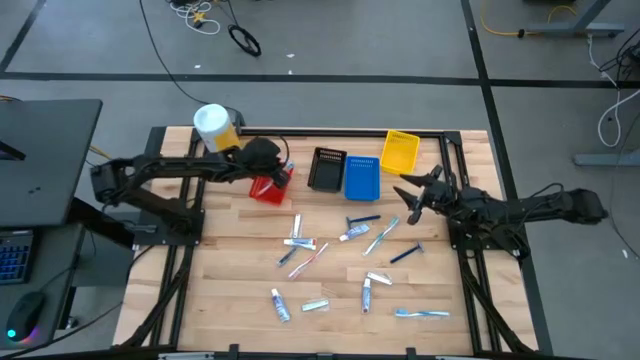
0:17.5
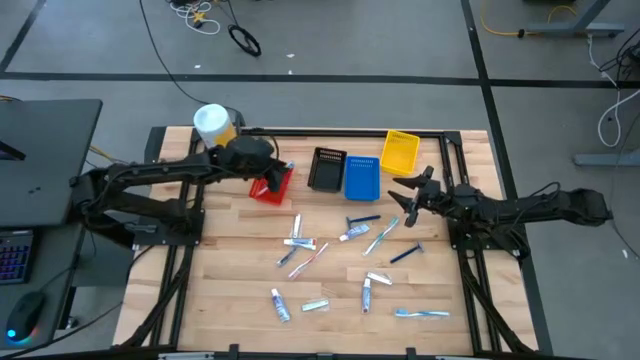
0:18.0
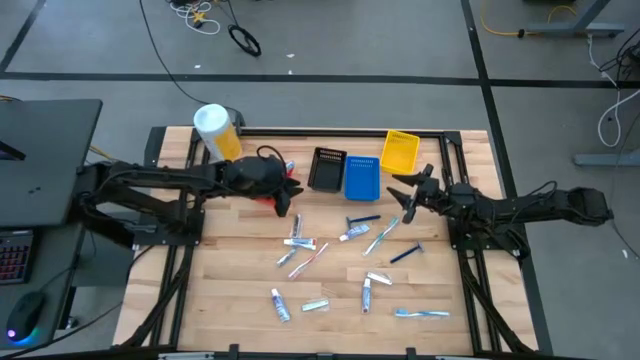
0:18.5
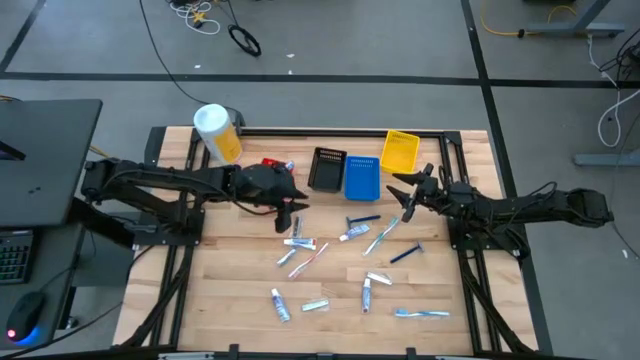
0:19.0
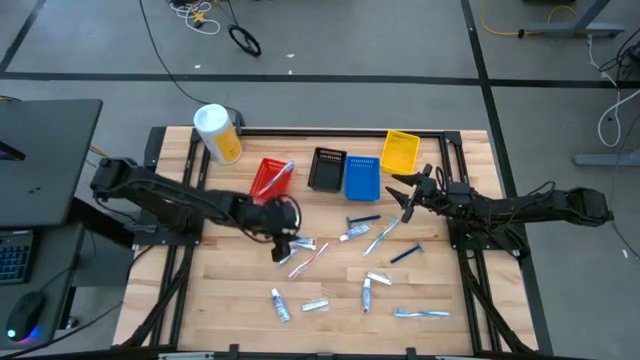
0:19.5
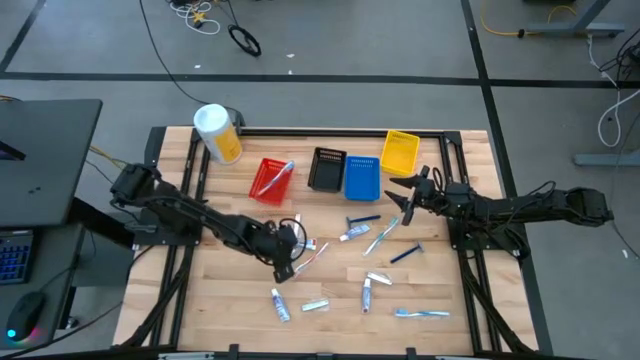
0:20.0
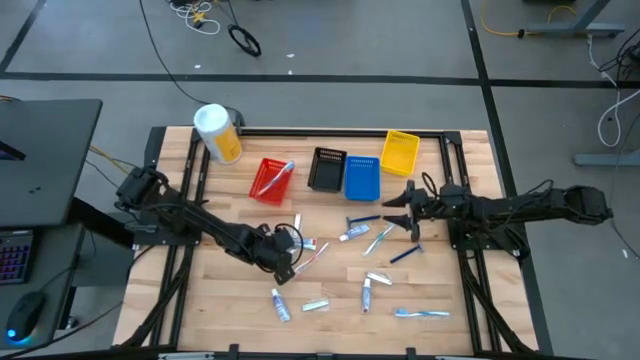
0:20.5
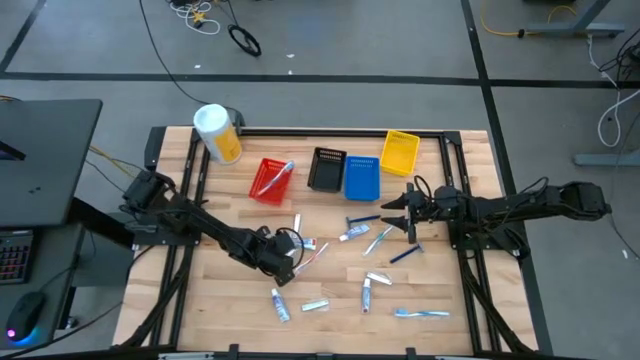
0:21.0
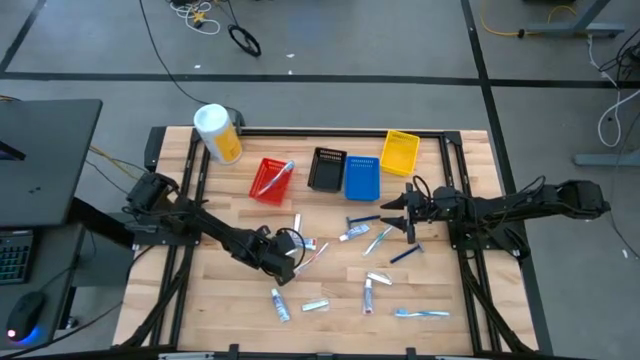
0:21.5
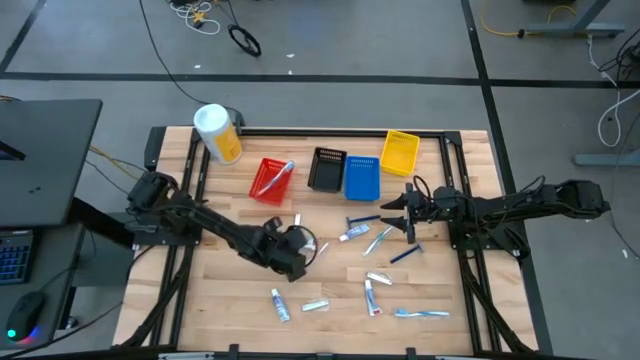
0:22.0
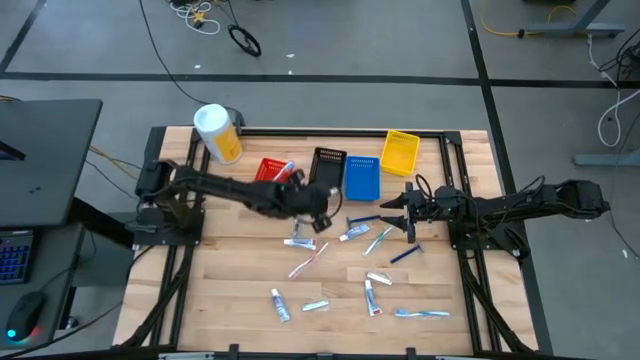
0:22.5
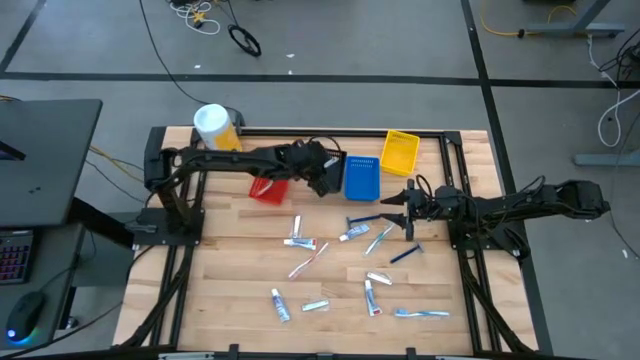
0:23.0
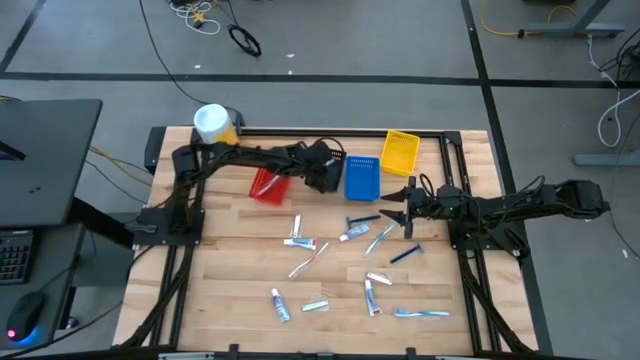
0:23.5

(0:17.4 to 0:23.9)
Task: Pick & Place Travel size toiletries
Put the nail cutter into the black bin

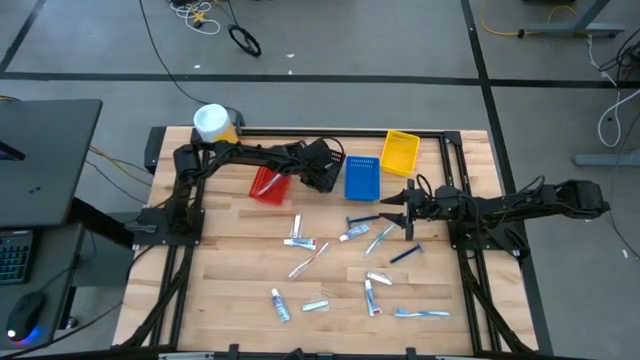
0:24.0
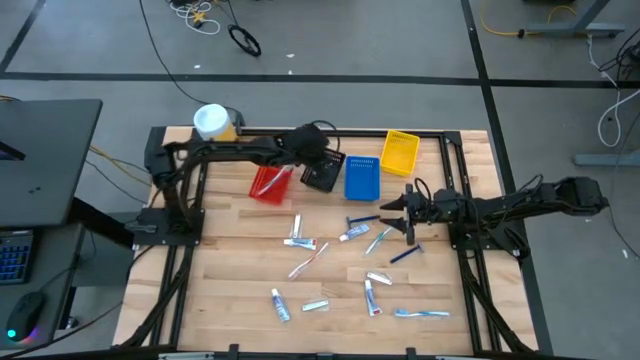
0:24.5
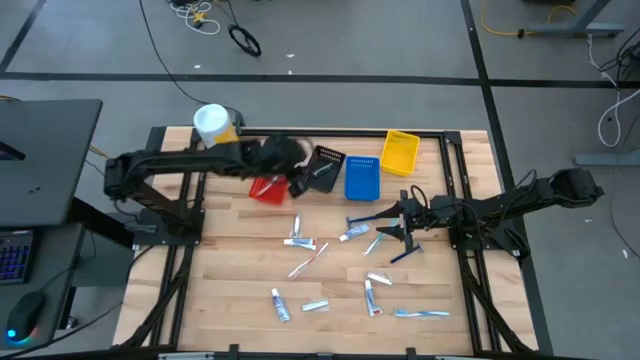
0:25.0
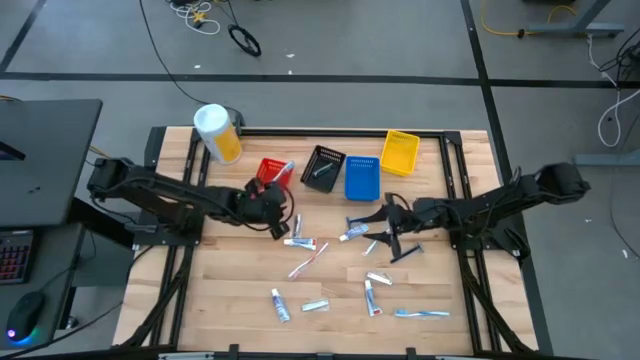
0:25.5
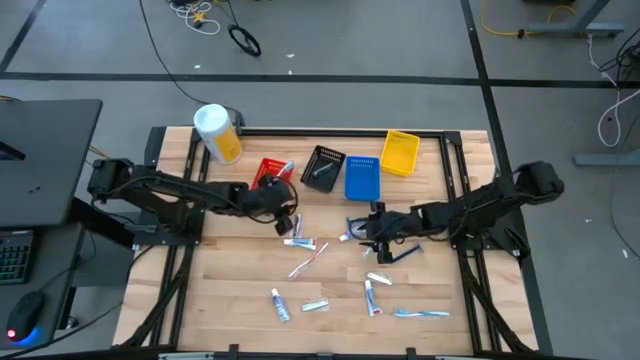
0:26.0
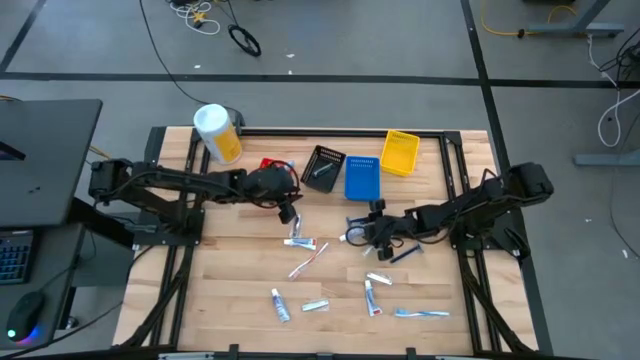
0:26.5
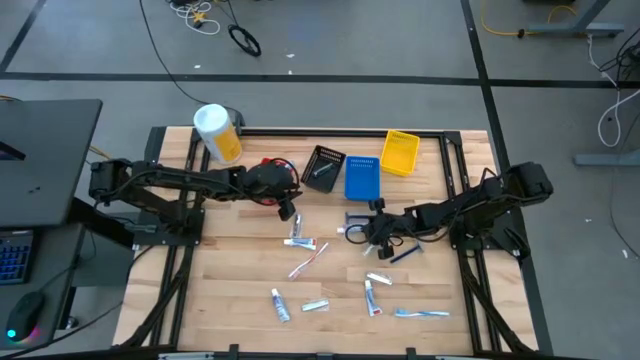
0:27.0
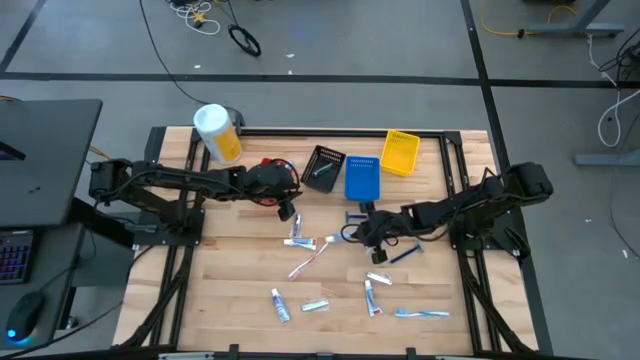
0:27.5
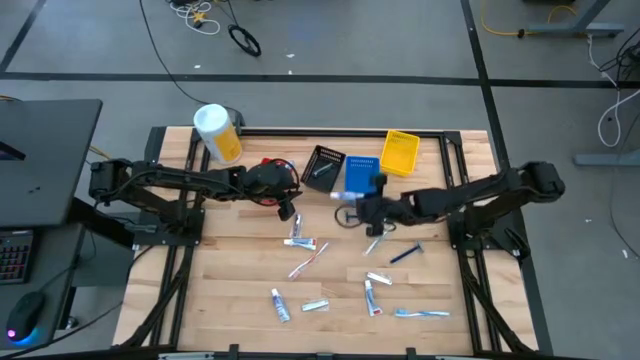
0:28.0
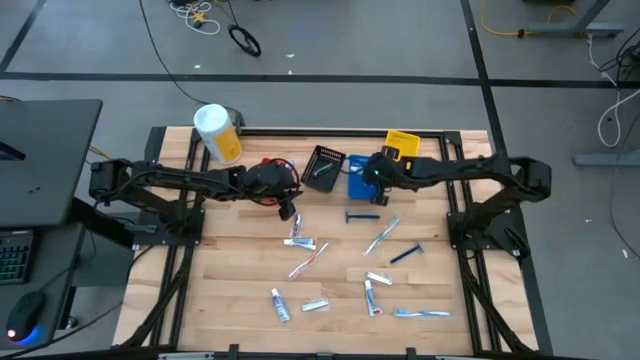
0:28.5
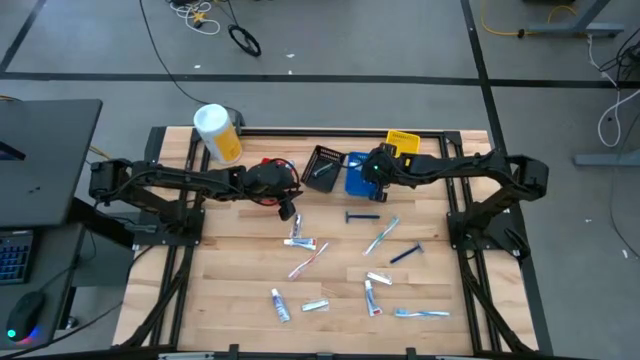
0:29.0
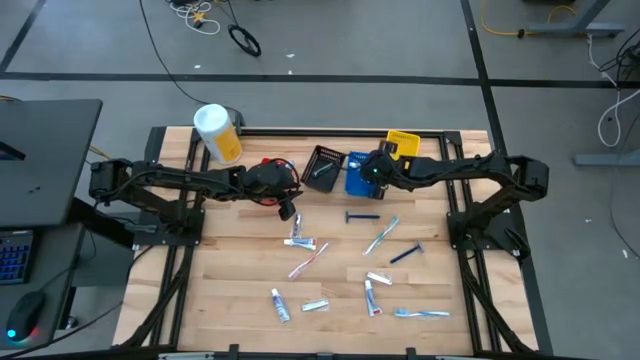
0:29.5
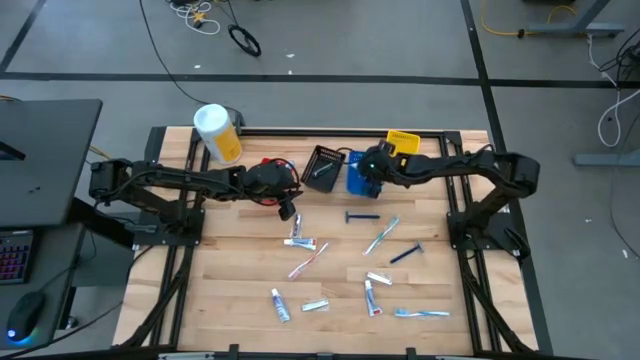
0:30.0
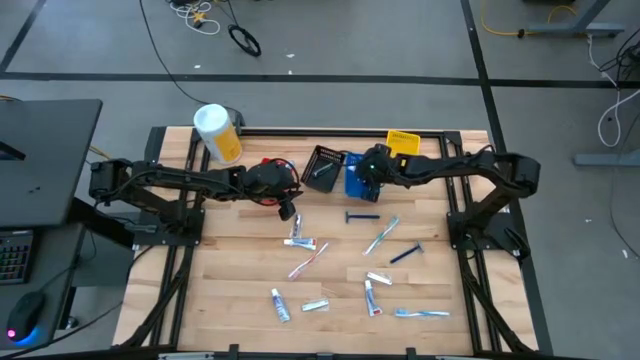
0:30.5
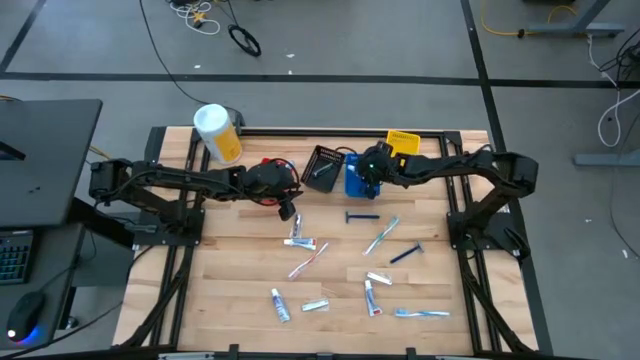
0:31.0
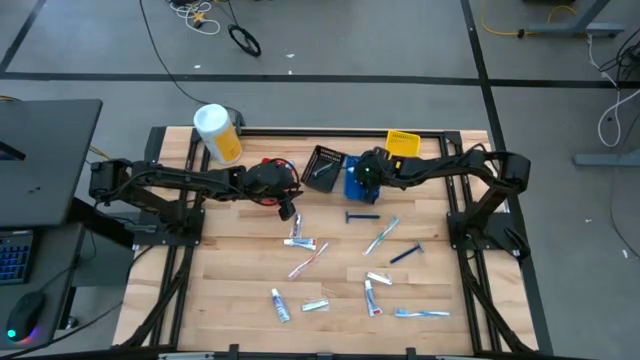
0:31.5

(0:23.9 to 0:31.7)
Put the purple toothpaste into the blue bin

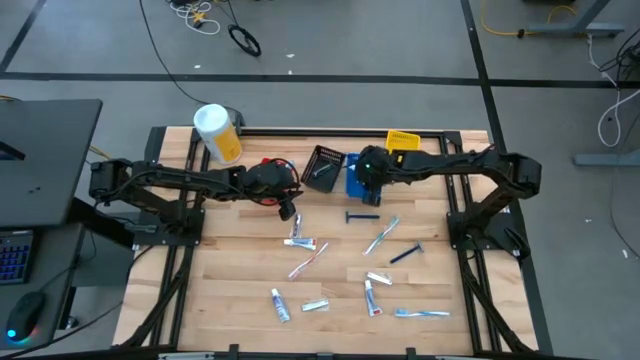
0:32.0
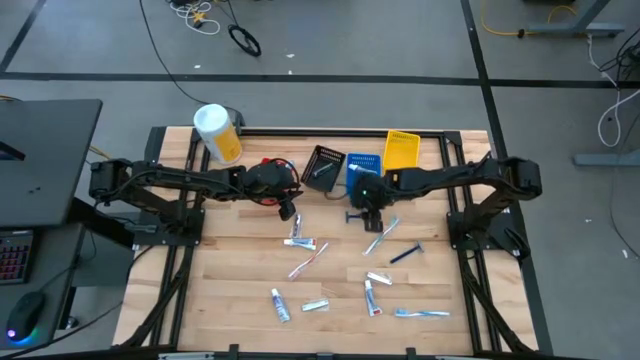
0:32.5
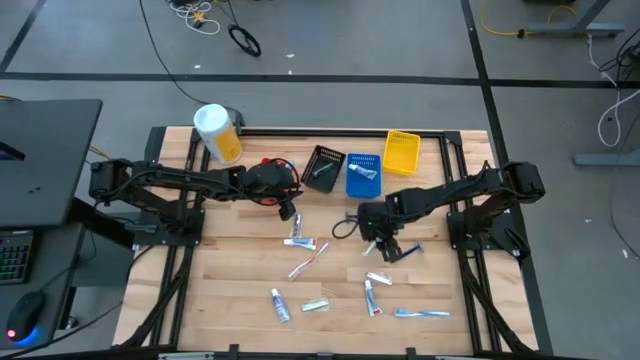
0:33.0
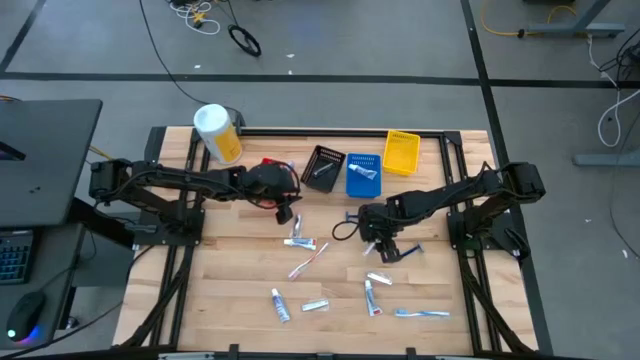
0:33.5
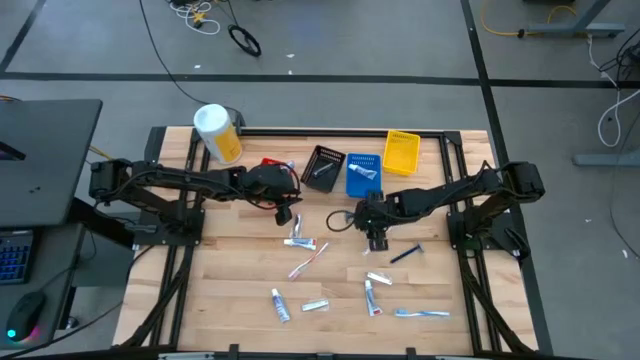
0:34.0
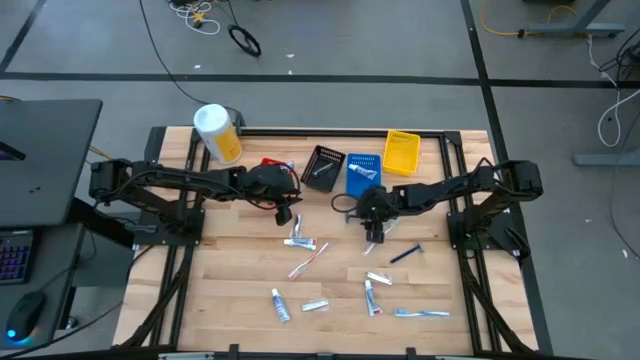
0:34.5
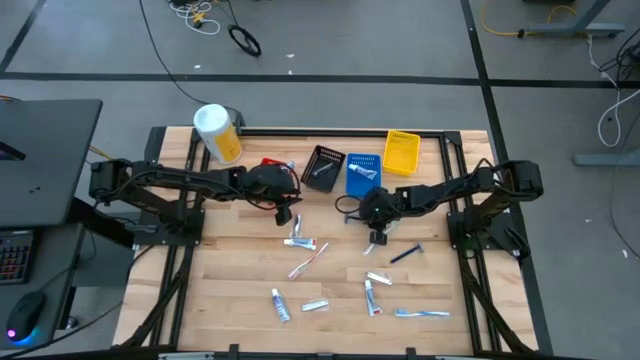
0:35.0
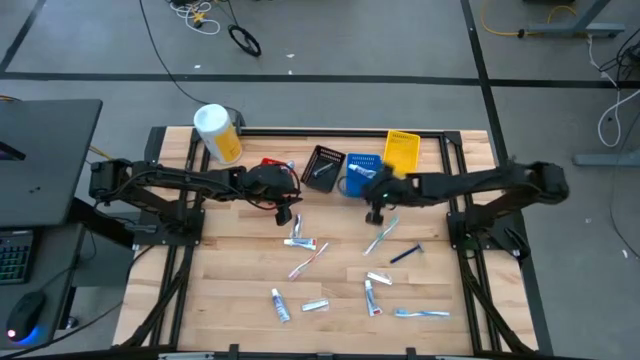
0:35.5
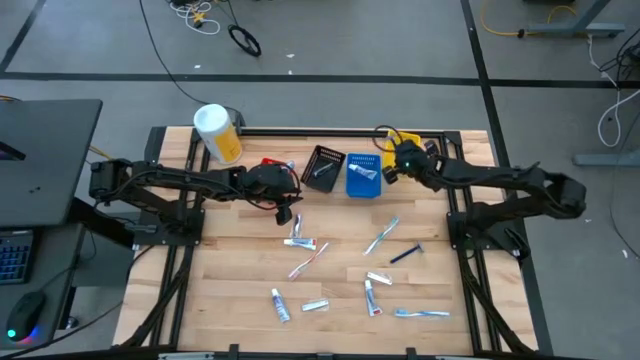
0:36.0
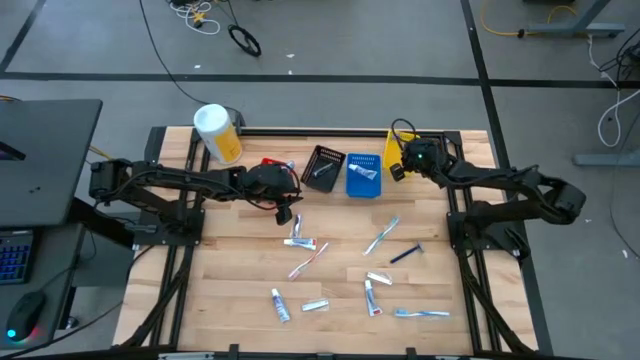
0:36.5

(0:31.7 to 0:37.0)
Put the blue razor into the yellow bin

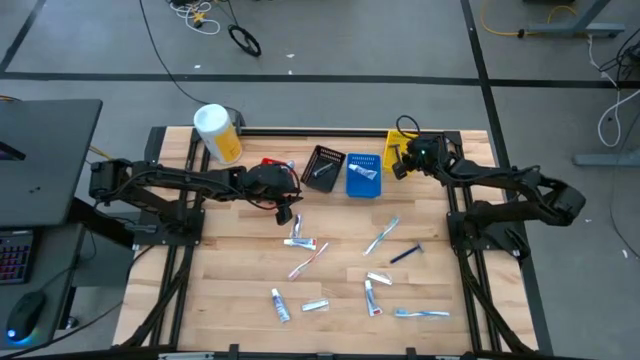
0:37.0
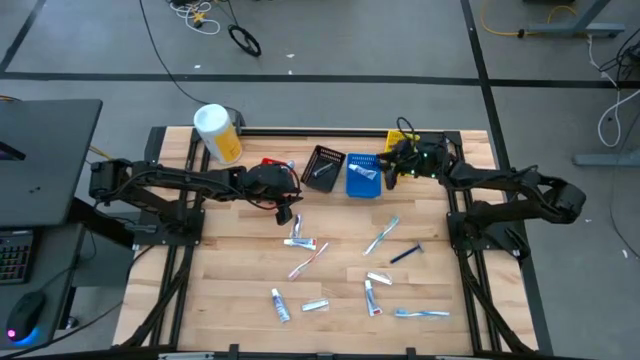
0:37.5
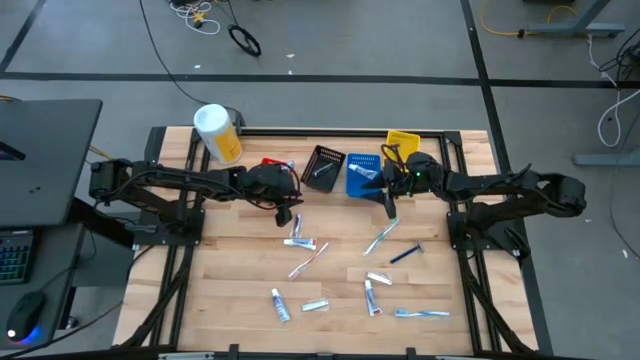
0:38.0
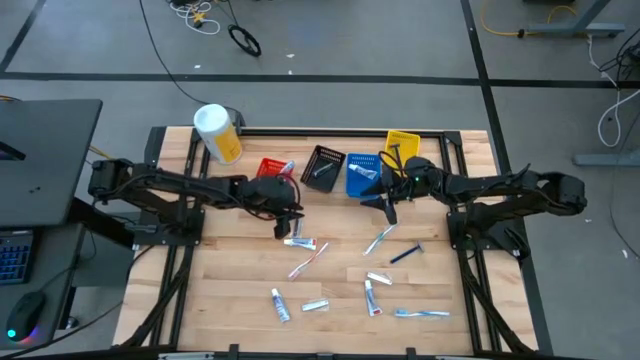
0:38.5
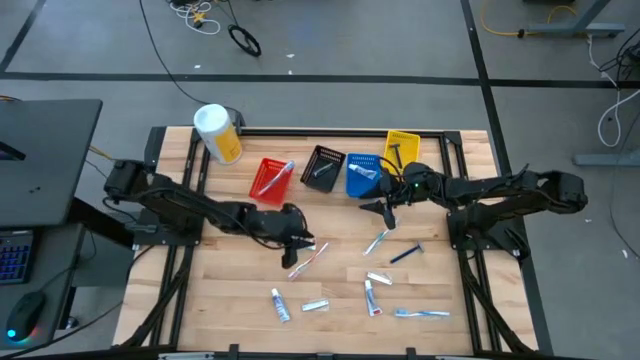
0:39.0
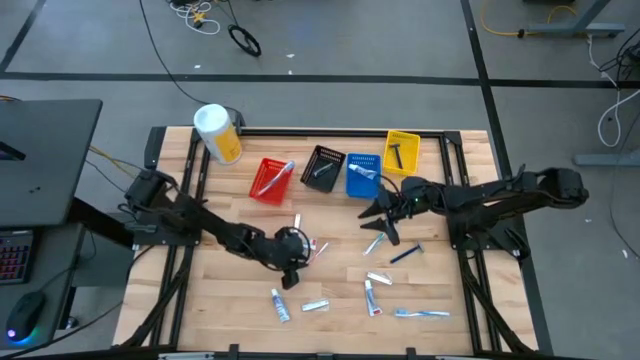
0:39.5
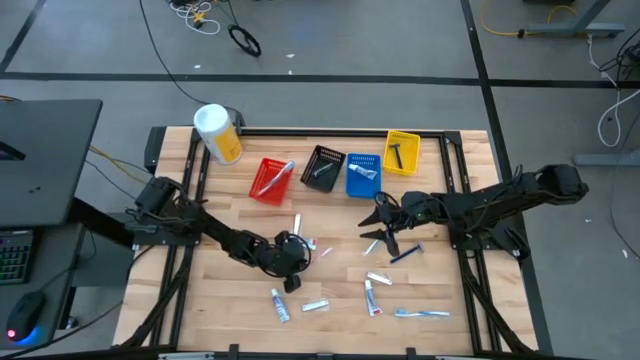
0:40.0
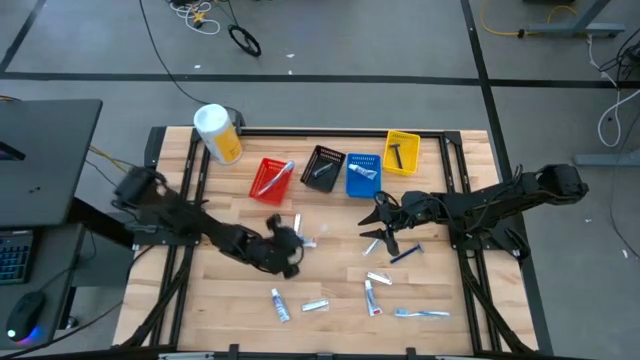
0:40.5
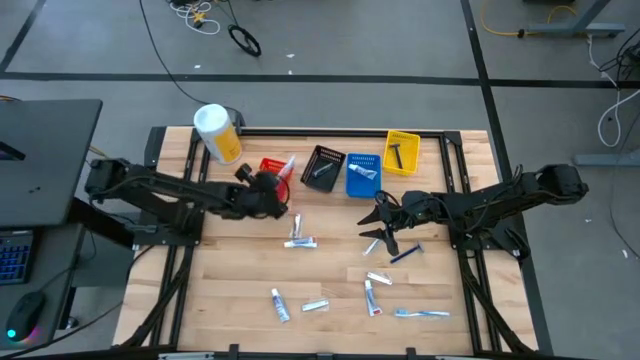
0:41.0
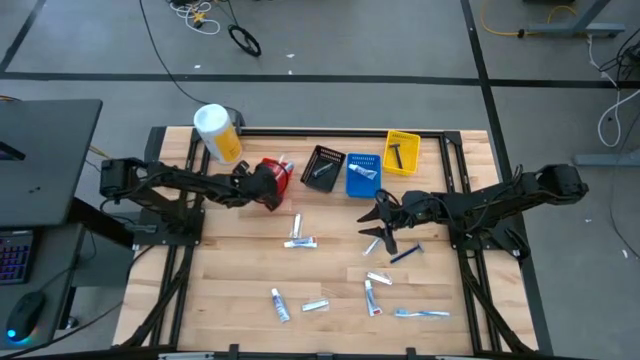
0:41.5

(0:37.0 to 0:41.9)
Put the orange toothbrush into the red bin
